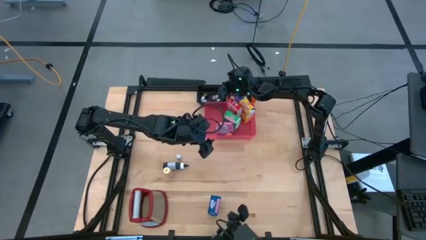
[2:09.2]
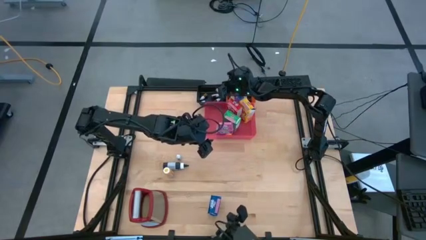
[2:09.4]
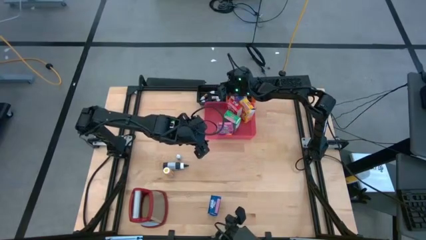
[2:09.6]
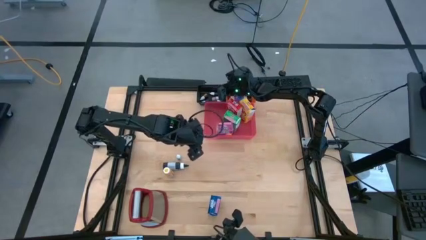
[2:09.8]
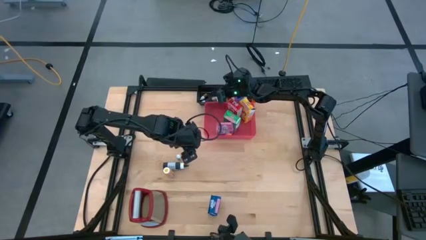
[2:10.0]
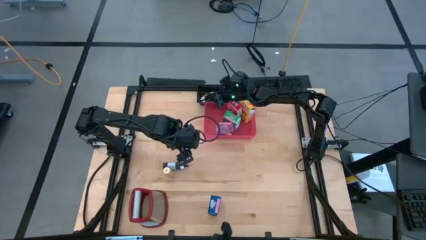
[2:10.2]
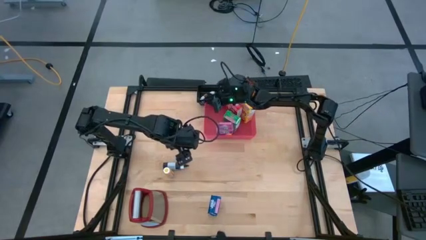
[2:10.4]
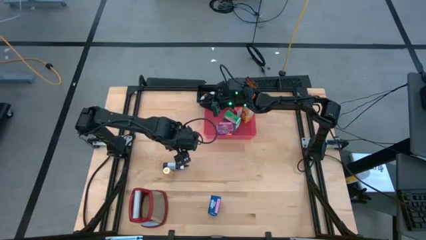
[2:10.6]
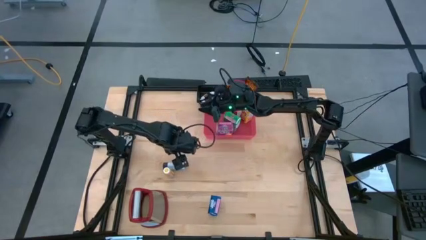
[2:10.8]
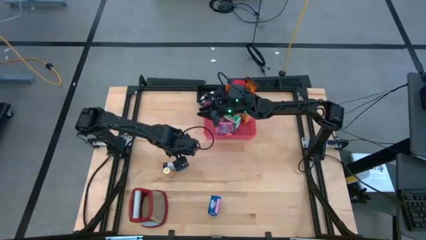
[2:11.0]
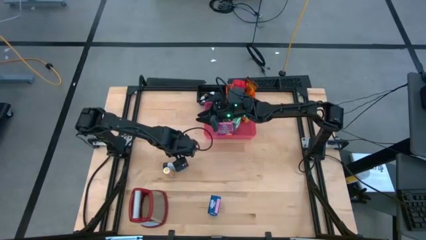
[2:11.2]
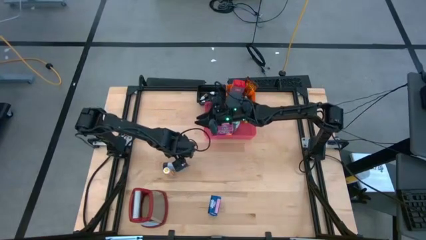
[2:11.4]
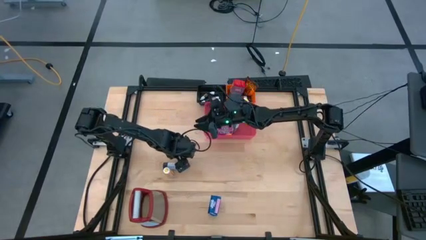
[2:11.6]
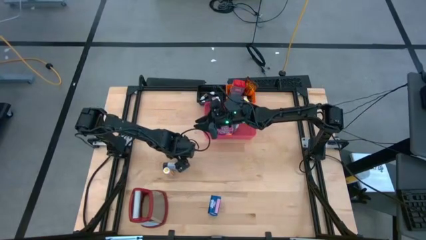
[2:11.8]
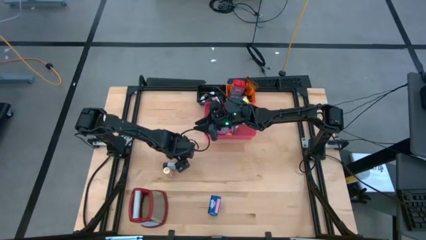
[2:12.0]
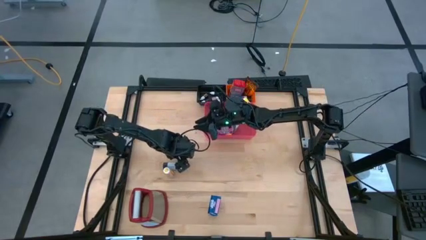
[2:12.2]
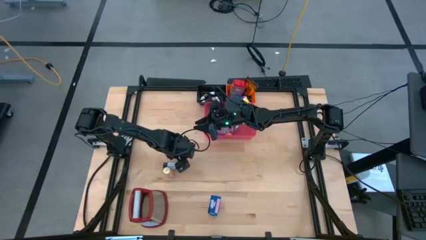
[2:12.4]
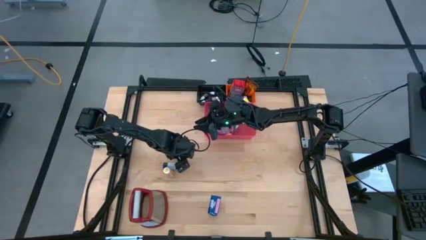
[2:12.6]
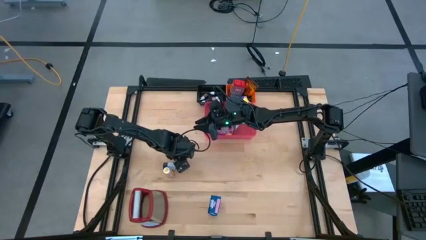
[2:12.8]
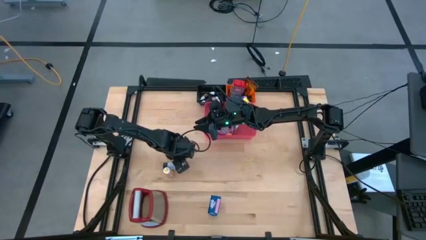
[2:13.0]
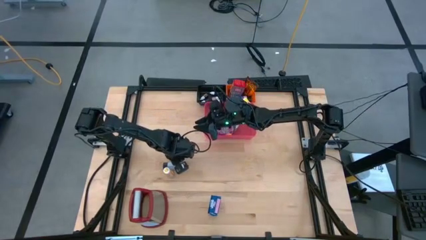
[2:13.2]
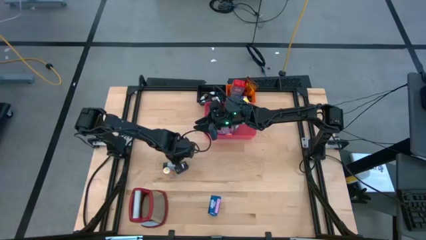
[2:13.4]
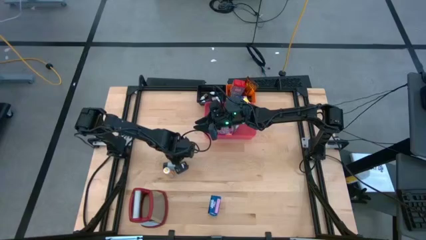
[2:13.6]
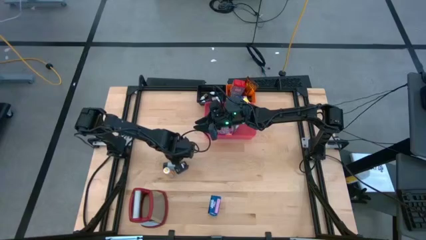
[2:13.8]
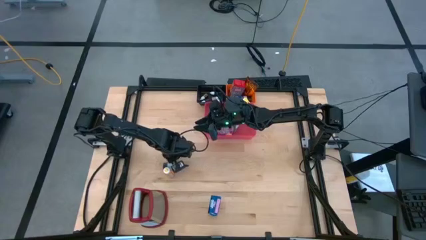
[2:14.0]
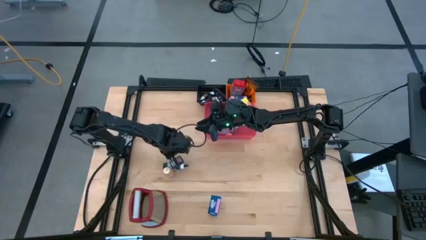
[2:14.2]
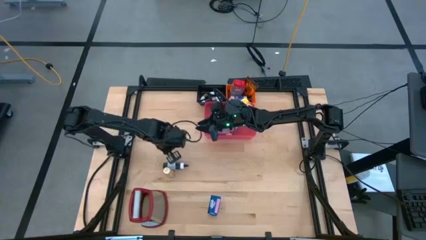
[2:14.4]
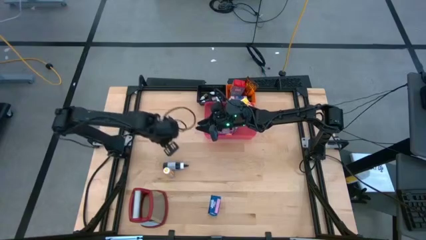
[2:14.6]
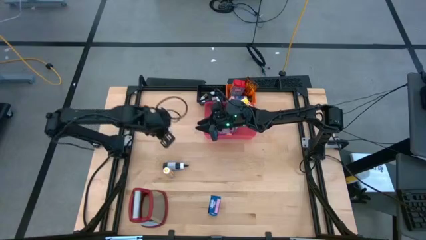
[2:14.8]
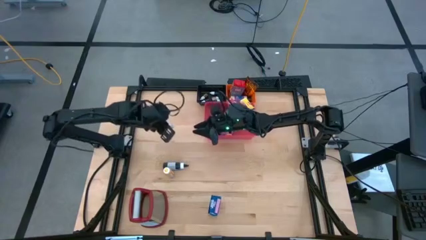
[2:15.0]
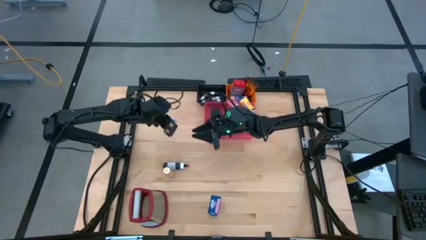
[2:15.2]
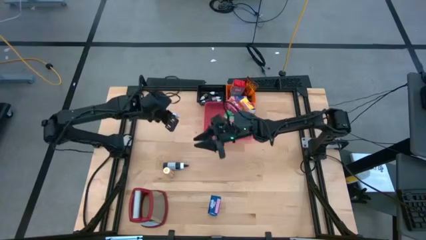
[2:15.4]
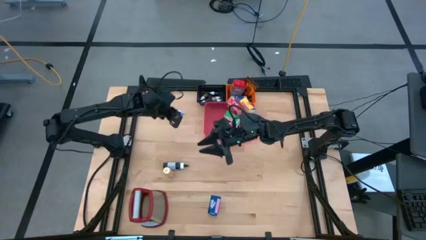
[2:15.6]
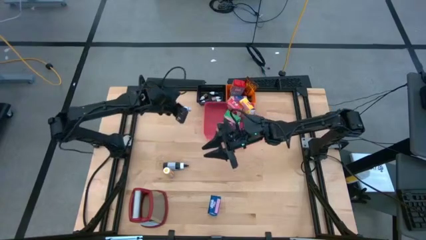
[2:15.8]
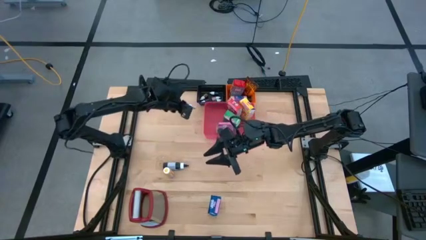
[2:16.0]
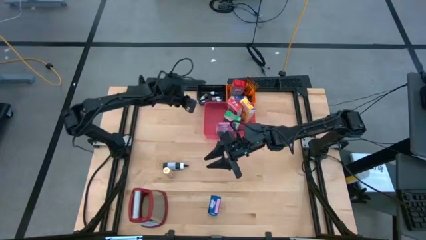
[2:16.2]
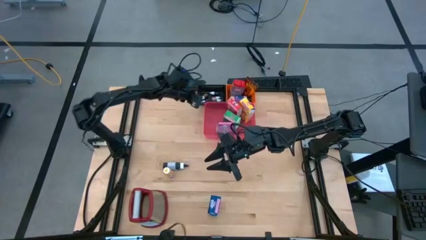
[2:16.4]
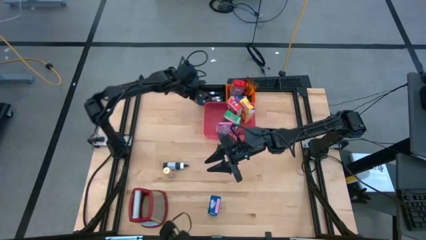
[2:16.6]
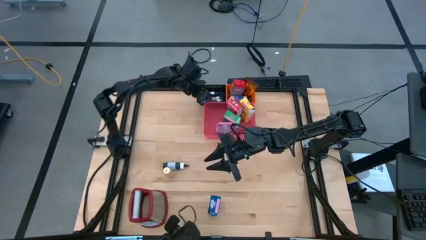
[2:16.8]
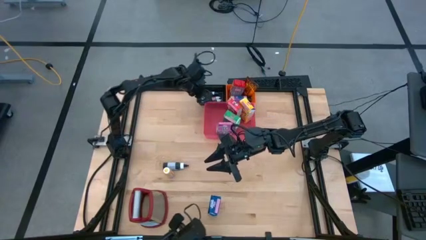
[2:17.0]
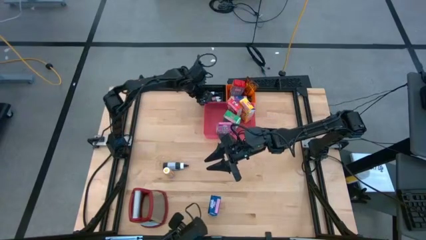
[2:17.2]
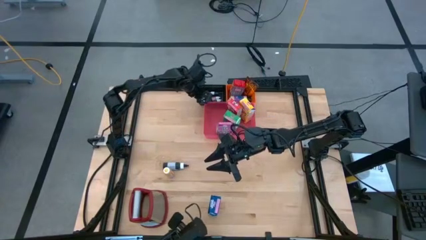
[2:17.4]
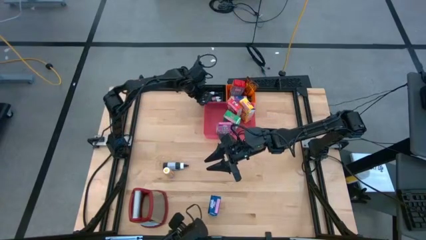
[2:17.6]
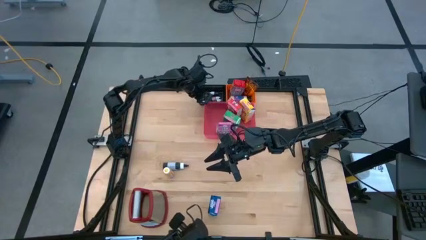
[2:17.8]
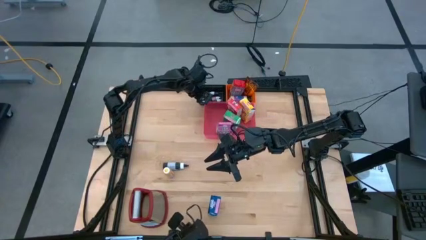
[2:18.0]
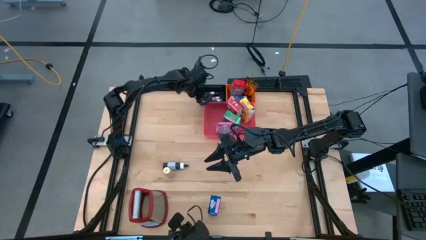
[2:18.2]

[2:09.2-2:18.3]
Task: Pick & Place Kitchen Items
Put the small green food coloring bottle into the black bin
